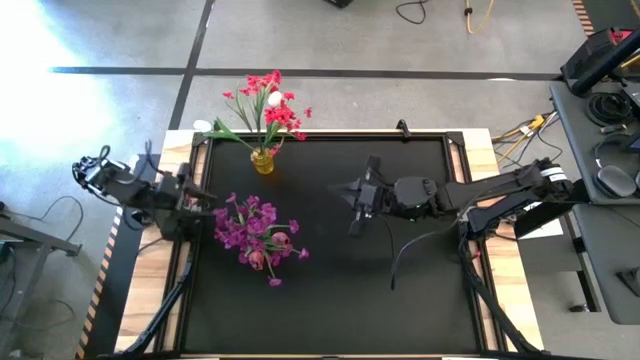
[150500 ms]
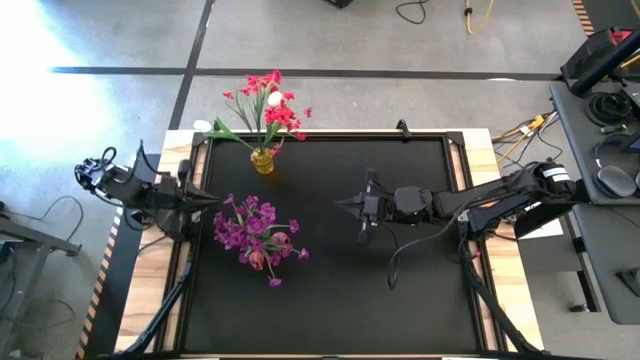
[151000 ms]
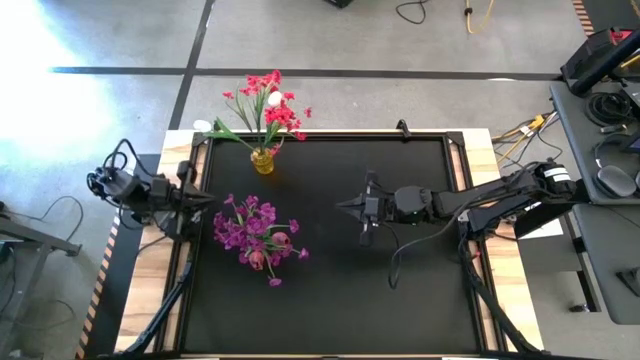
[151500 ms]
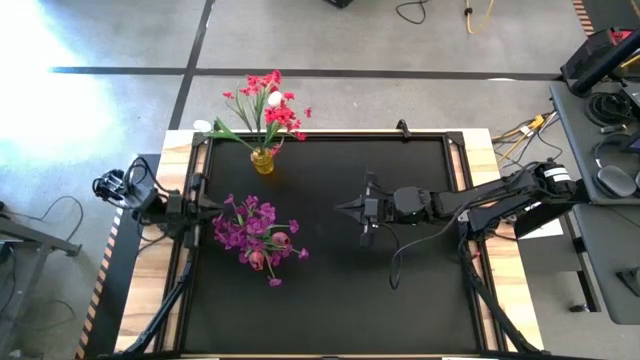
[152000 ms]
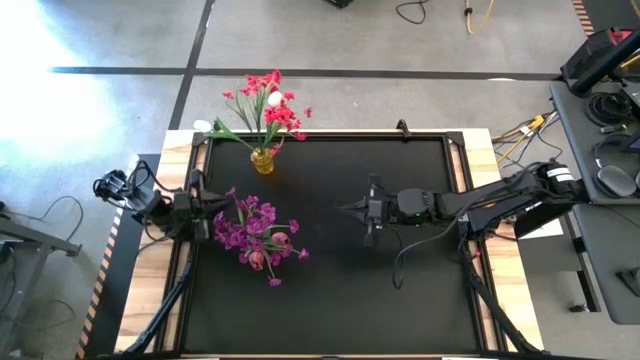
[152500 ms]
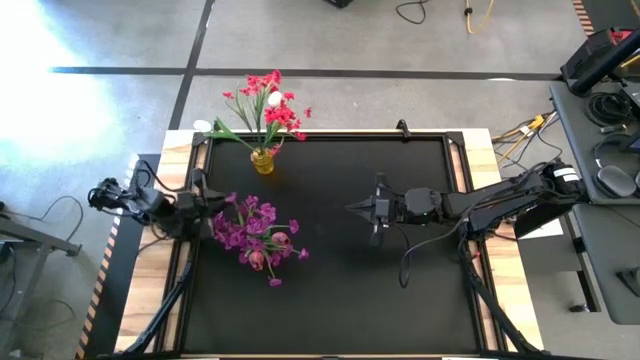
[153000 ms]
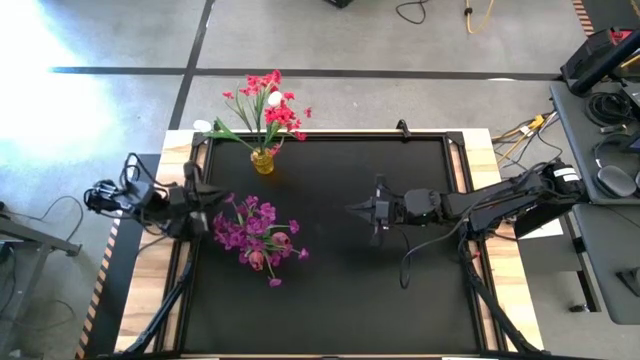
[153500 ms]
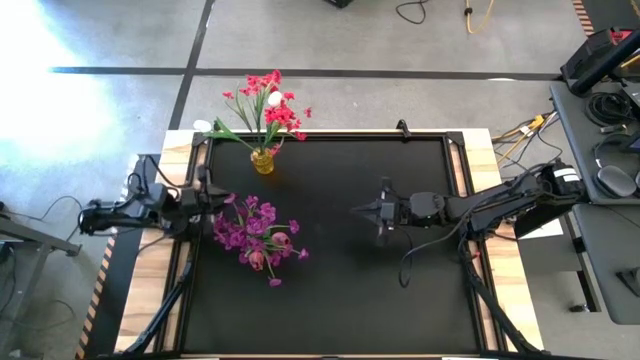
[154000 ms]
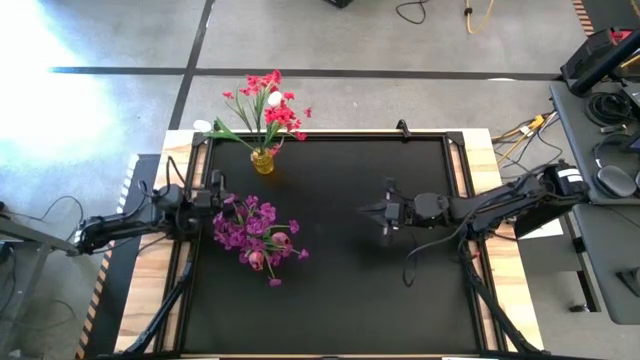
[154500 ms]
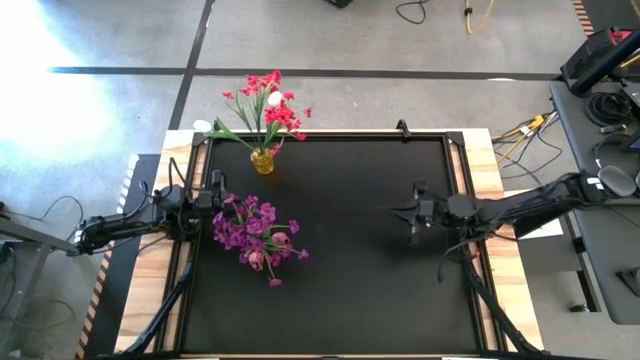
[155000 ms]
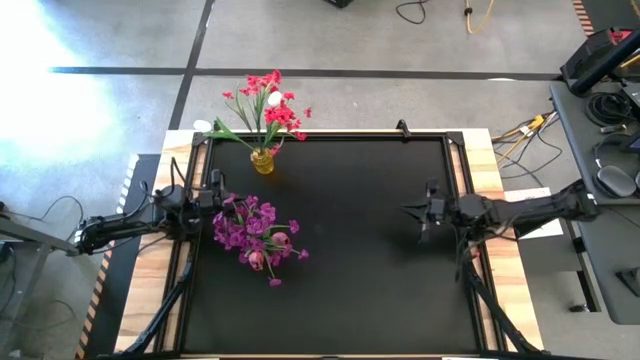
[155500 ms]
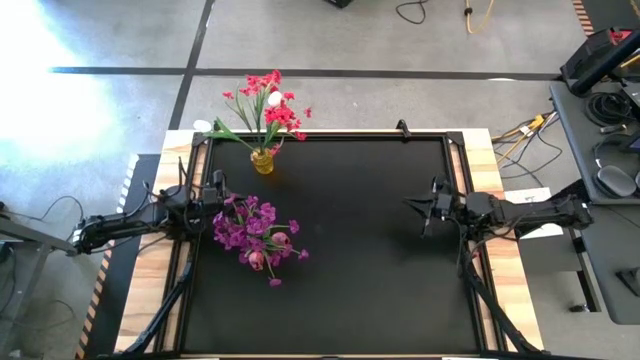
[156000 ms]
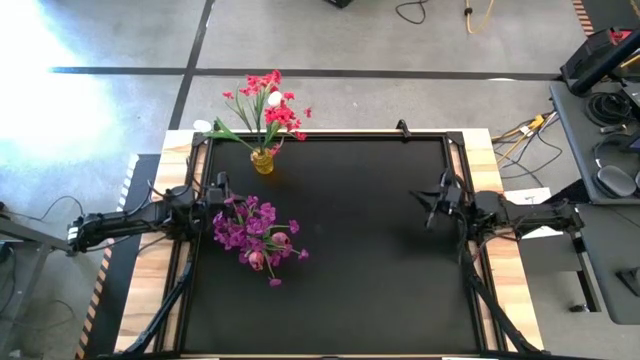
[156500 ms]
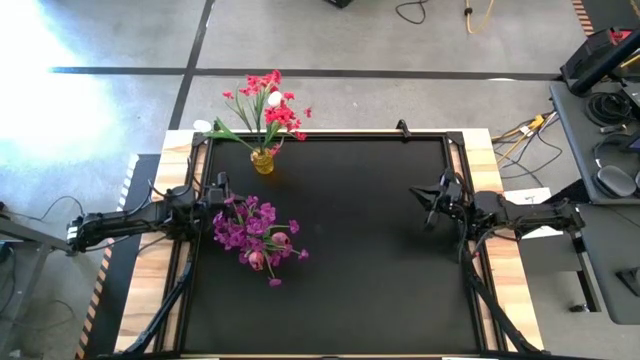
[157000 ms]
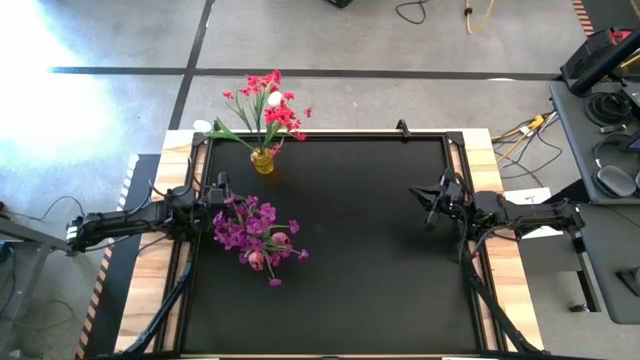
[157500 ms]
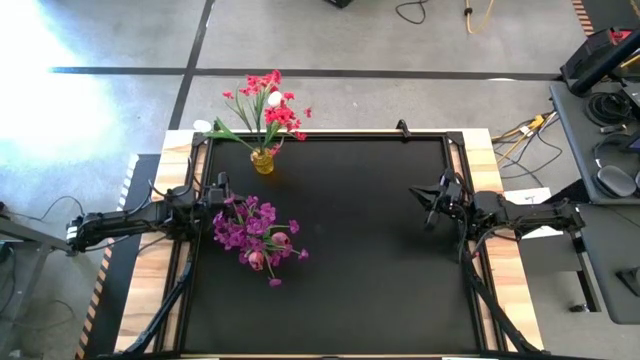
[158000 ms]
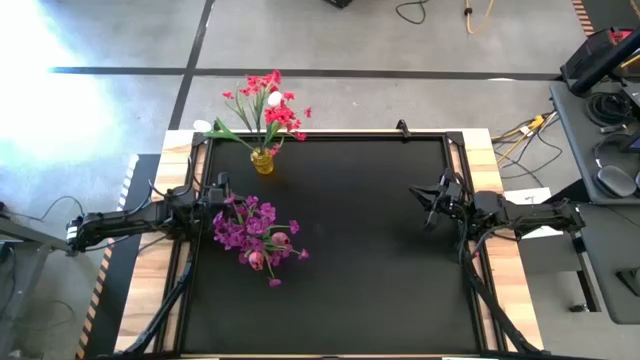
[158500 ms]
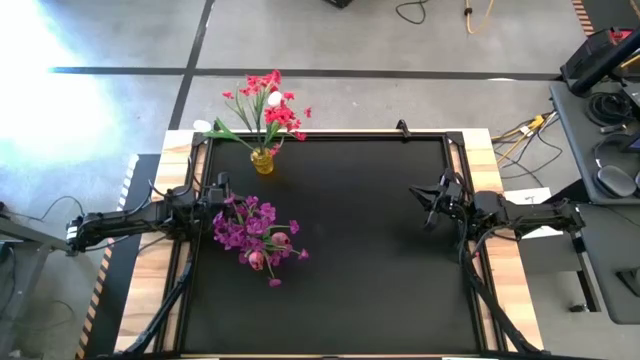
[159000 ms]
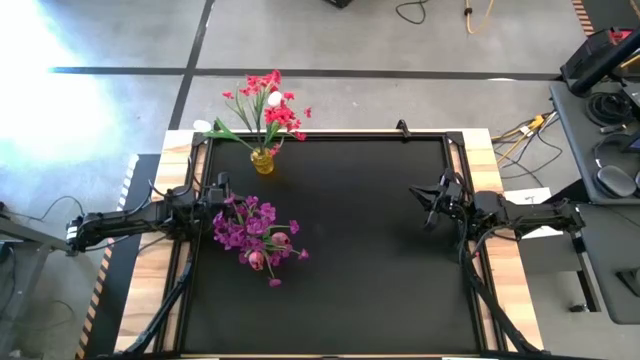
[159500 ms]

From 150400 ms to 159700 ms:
Task: Sort flowers into vase by color
Return to Home Position

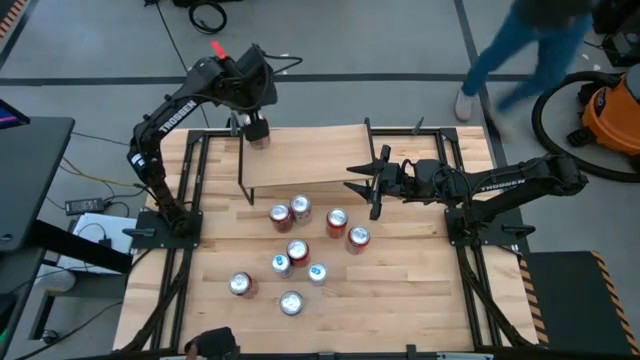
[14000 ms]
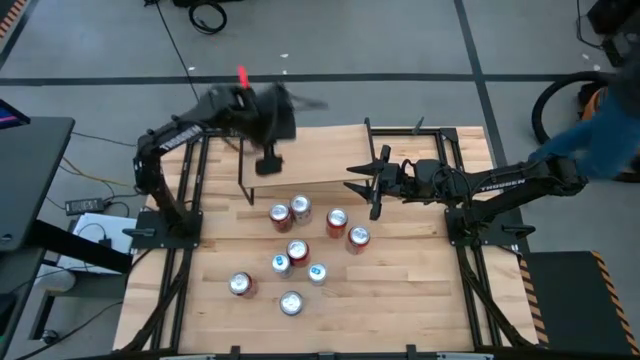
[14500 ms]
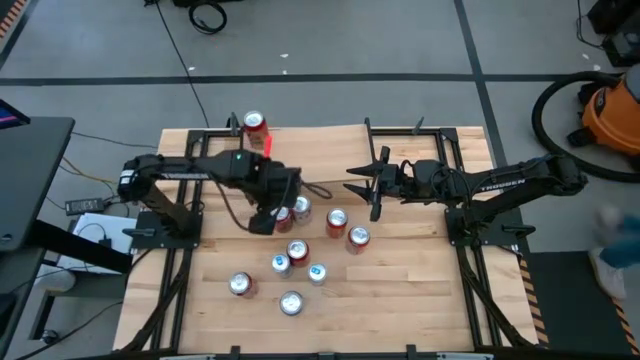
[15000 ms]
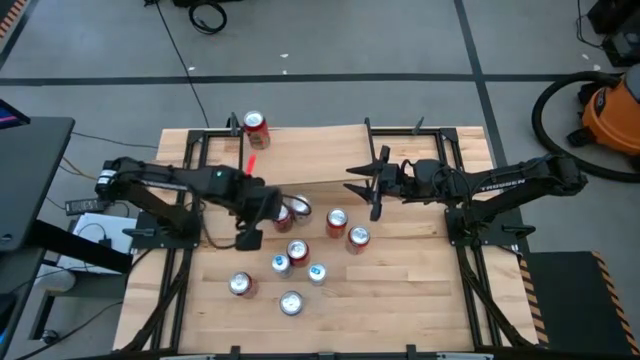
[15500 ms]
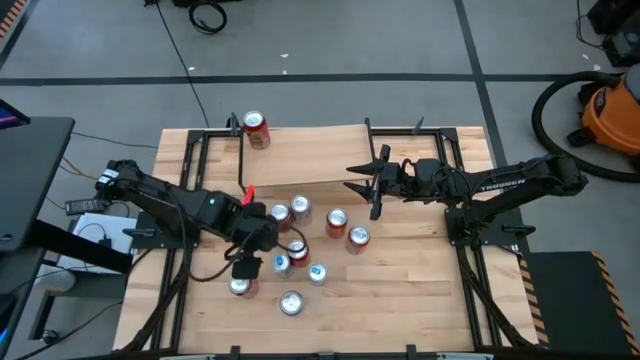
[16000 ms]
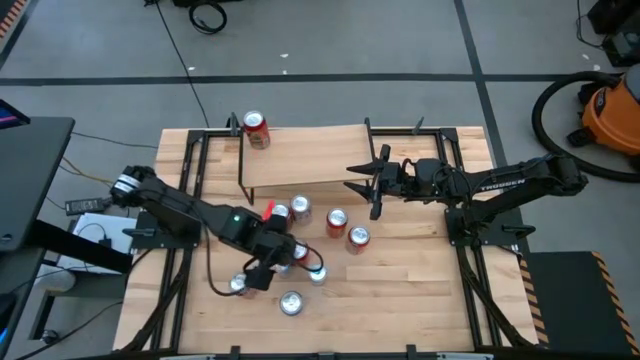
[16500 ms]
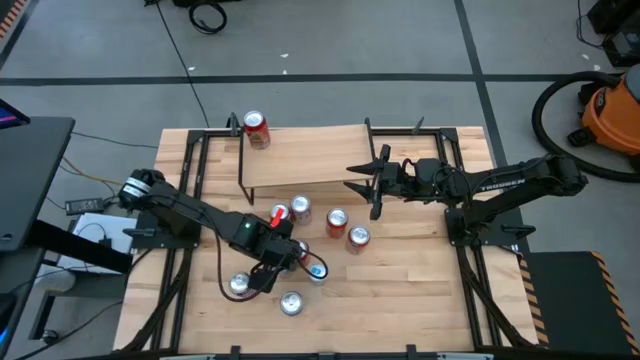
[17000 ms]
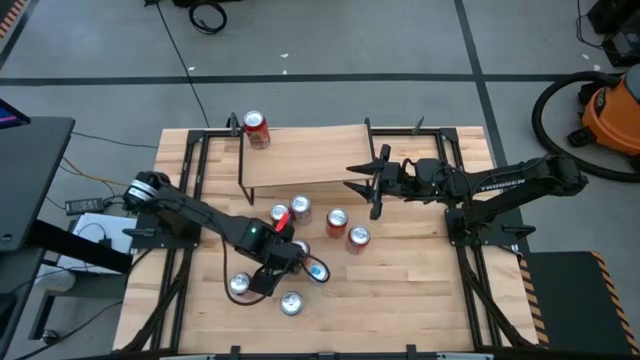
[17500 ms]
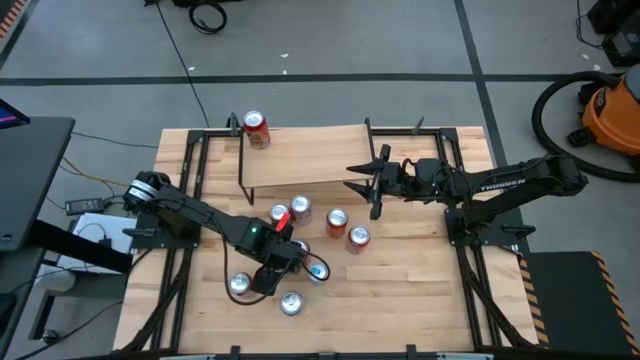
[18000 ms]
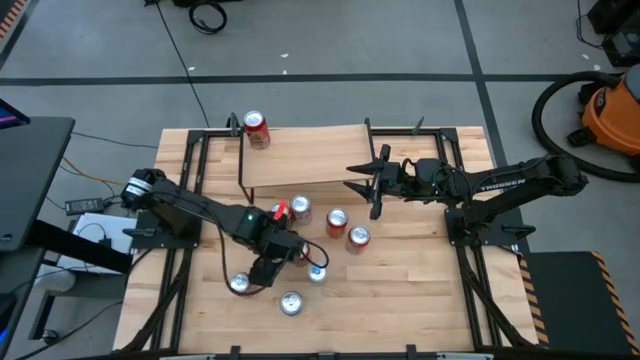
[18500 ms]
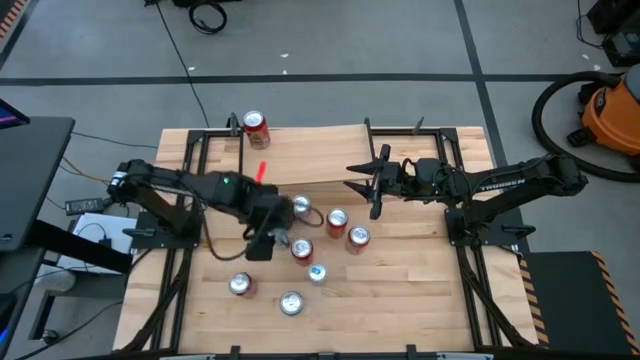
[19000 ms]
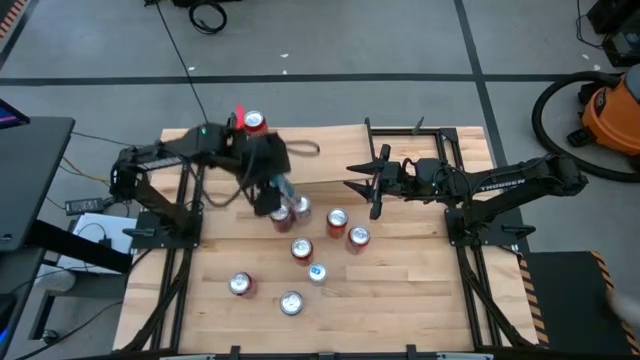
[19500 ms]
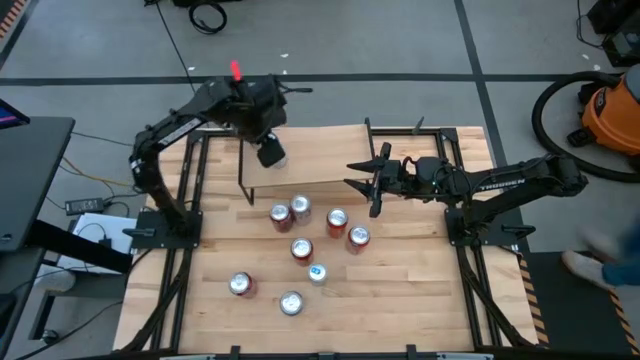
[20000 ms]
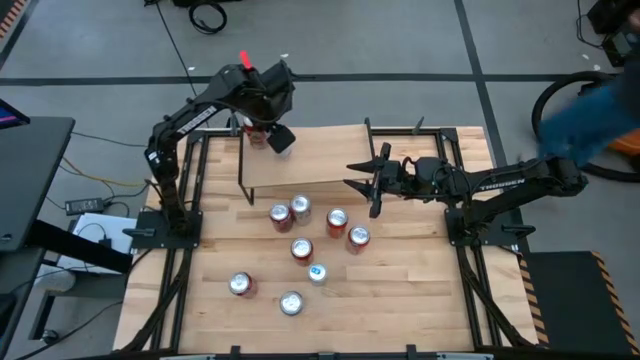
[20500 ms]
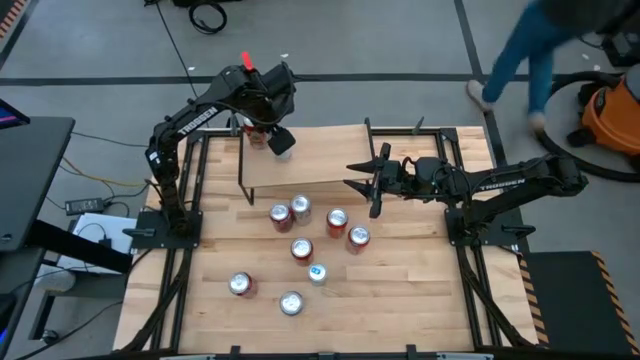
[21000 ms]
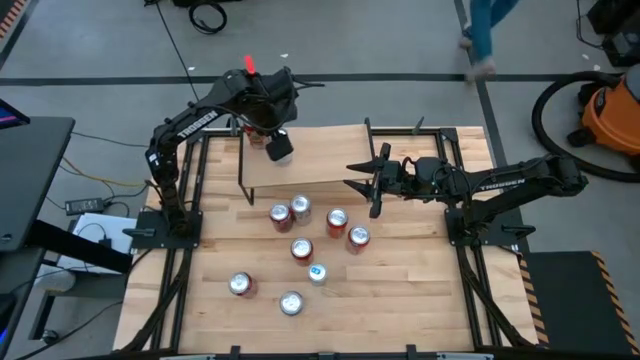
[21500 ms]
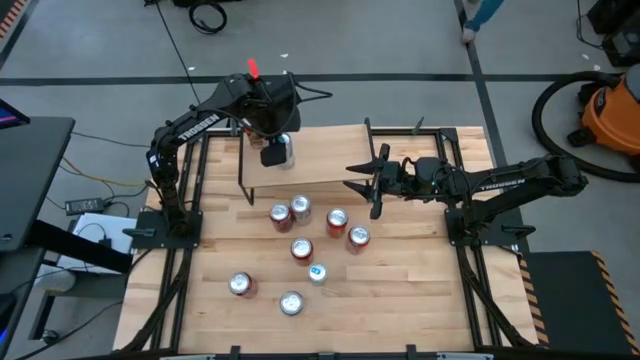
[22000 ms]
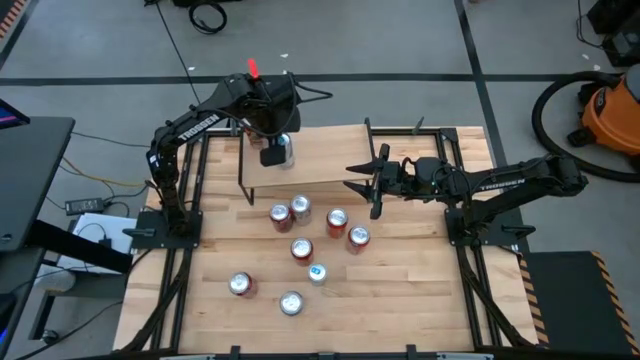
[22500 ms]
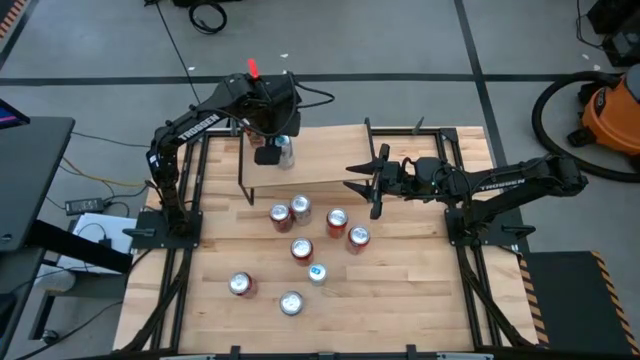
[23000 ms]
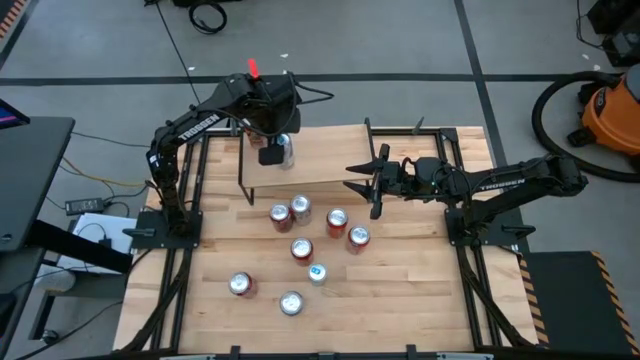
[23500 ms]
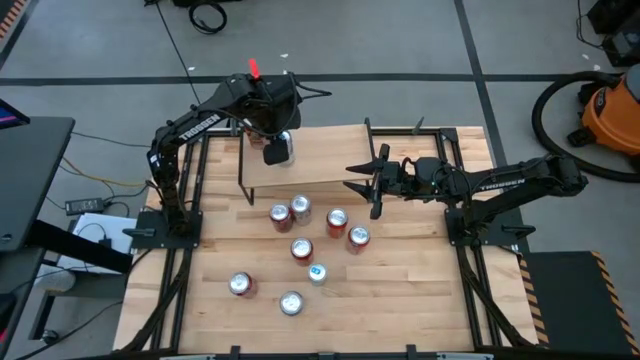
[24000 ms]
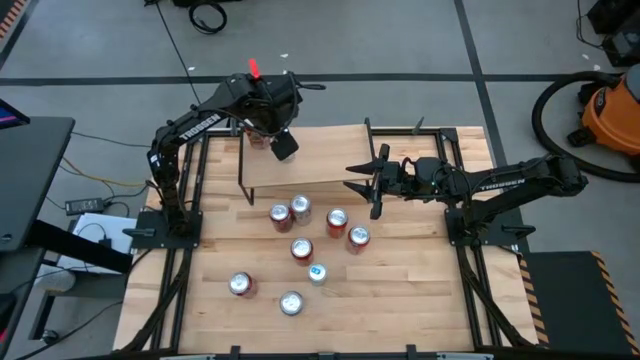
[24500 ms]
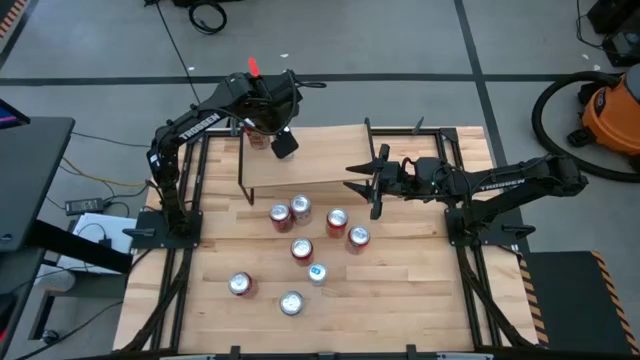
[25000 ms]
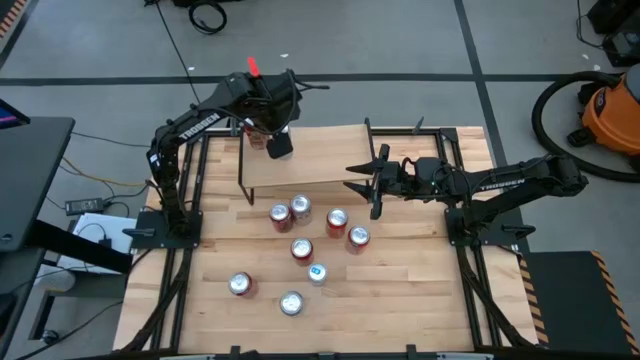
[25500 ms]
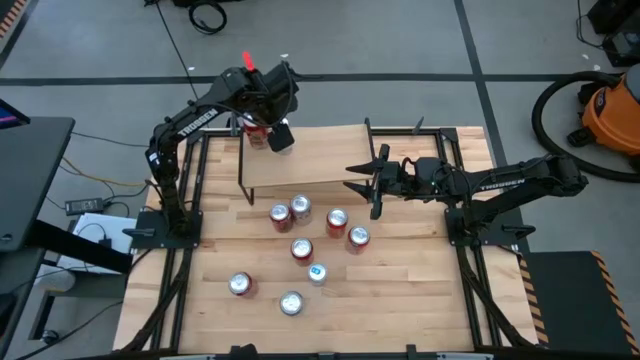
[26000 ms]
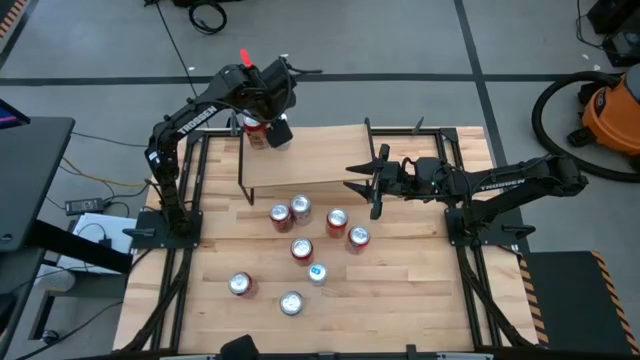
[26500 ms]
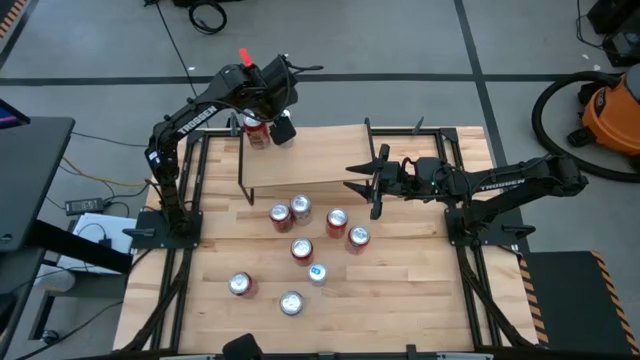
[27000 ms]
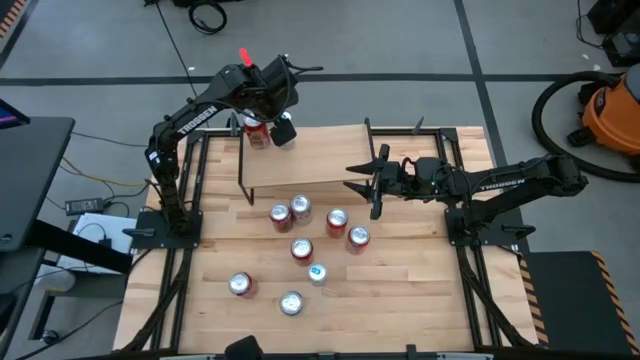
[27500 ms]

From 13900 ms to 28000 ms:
Task: Place canned beverage on shelf
Put the blue soda can on the shelf
